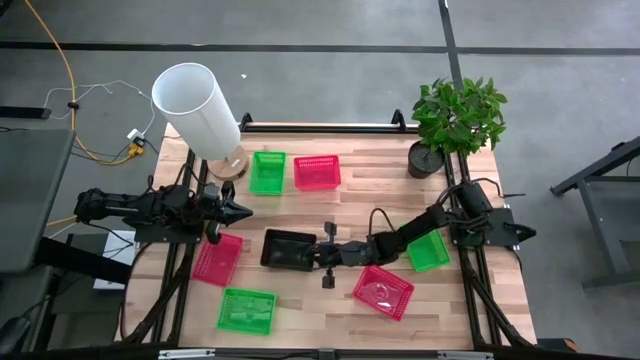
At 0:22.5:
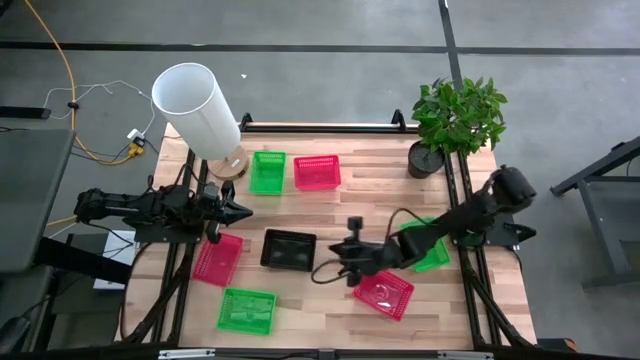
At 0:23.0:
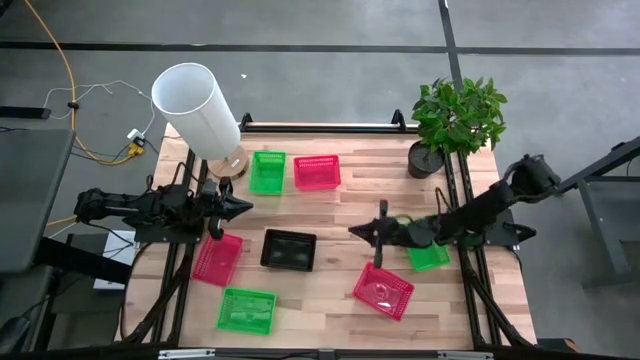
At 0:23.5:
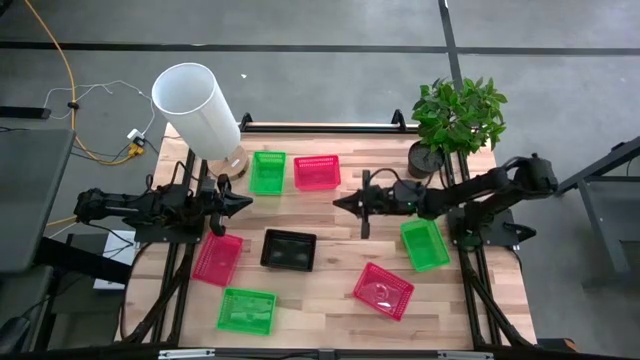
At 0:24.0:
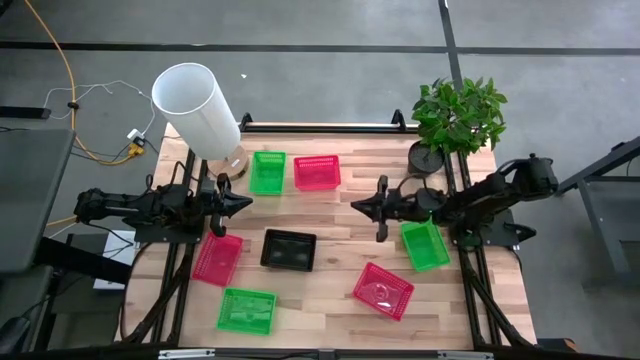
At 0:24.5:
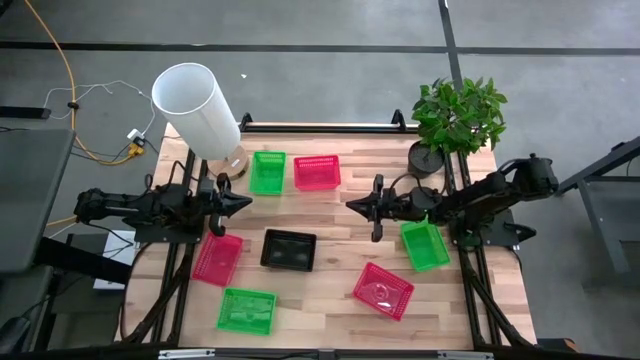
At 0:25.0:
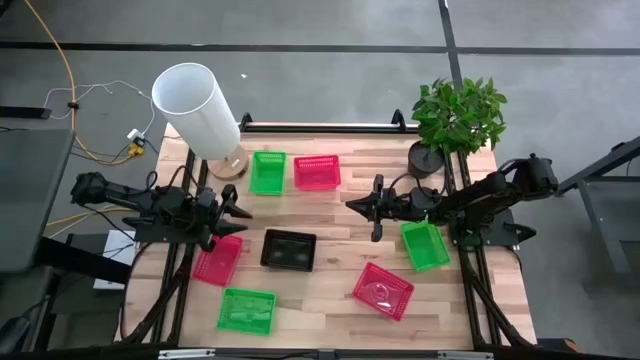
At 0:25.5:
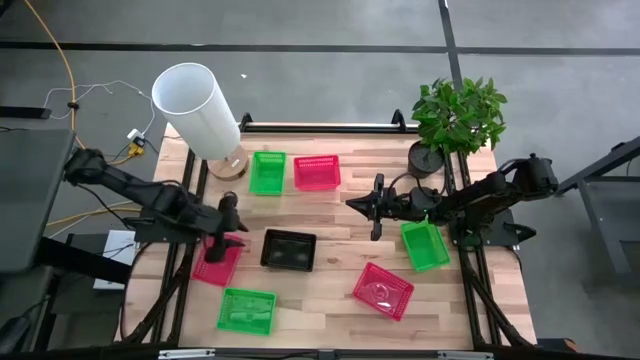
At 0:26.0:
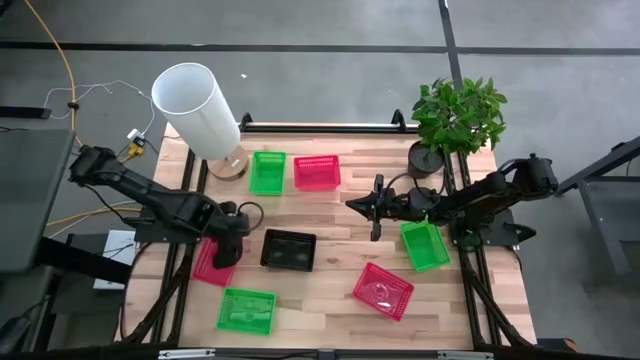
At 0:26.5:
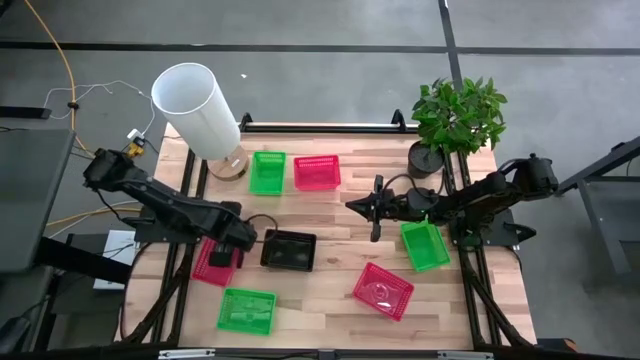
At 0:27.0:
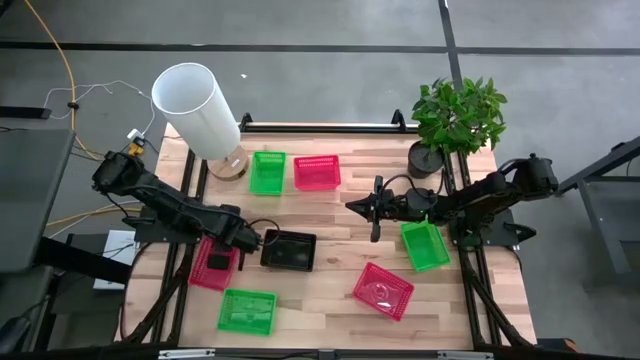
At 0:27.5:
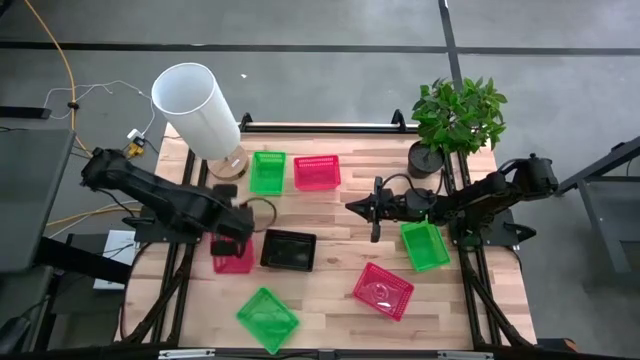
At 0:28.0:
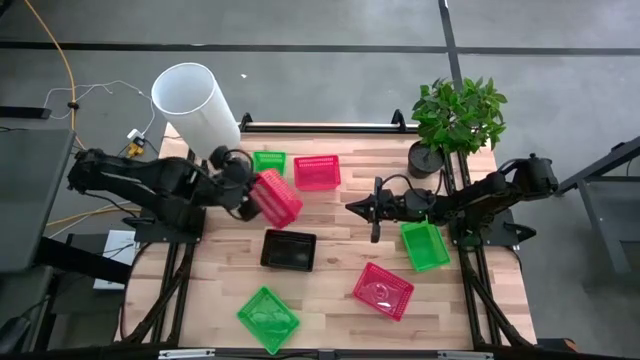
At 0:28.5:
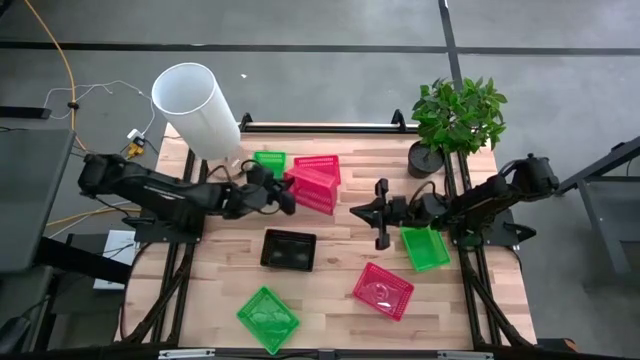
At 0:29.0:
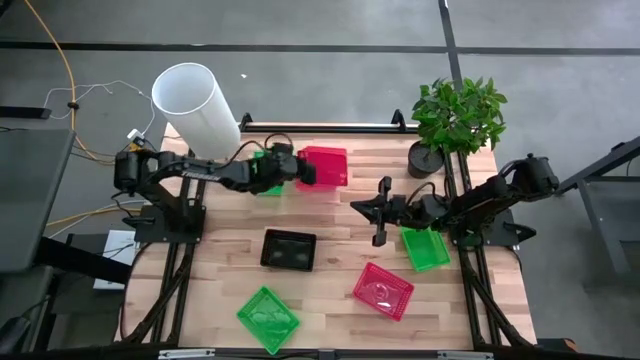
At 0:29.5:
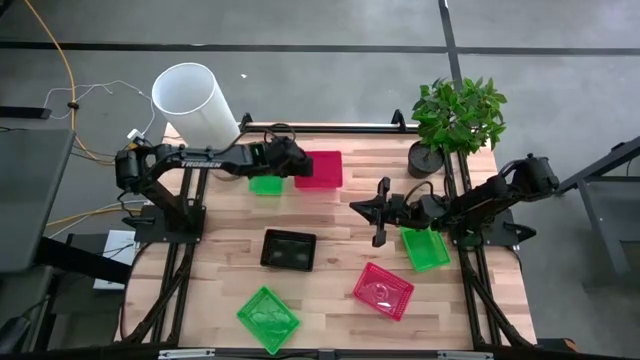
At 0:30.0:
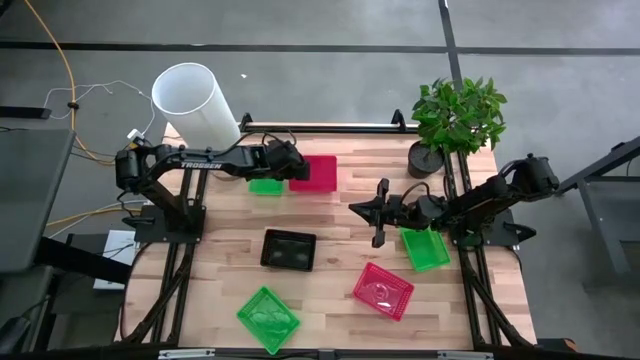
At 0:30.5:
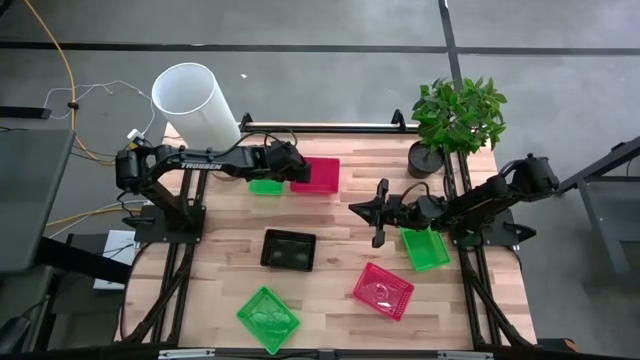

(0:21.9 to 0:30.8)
Stack the left red bin on the top red bin

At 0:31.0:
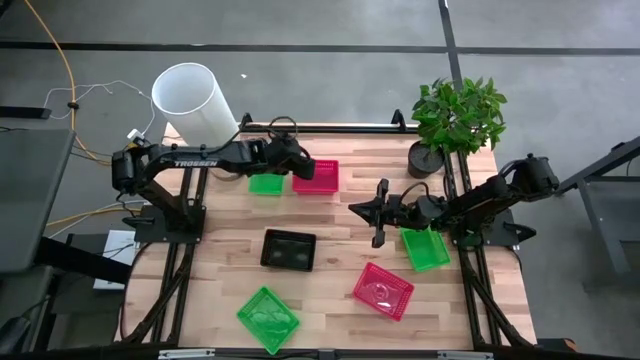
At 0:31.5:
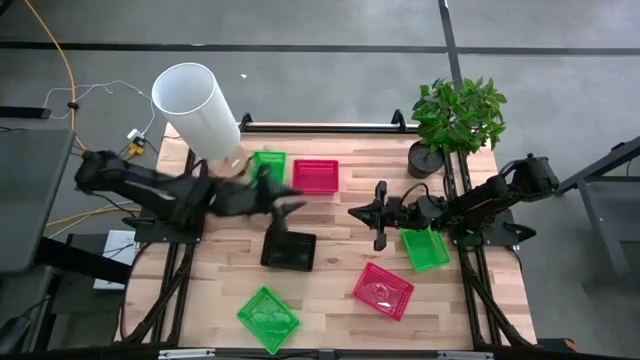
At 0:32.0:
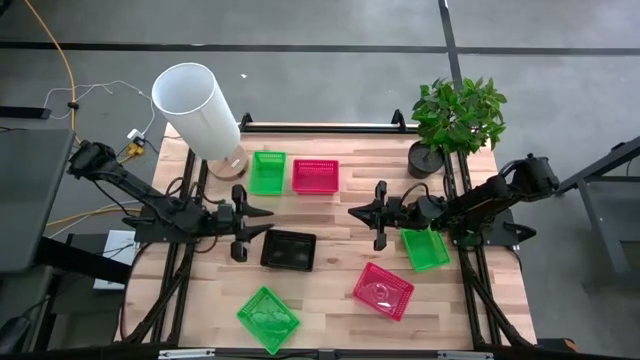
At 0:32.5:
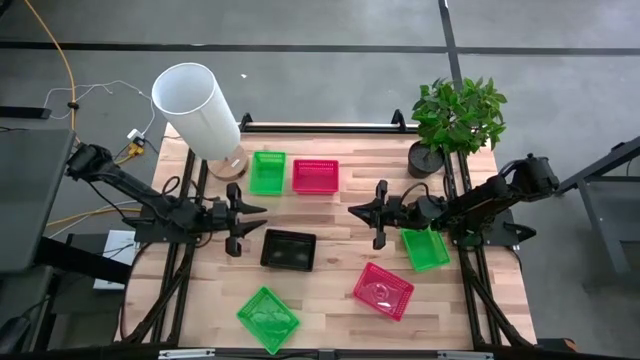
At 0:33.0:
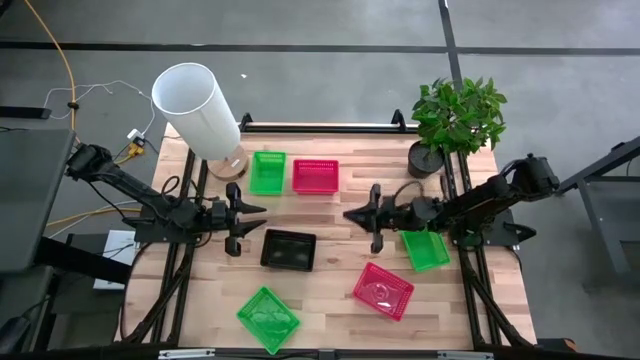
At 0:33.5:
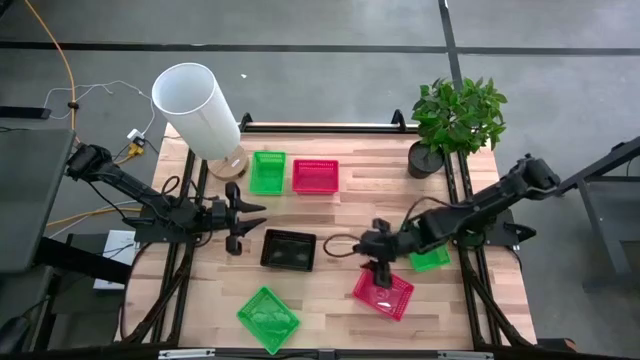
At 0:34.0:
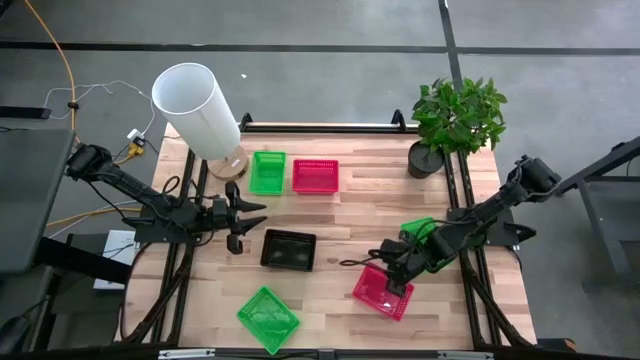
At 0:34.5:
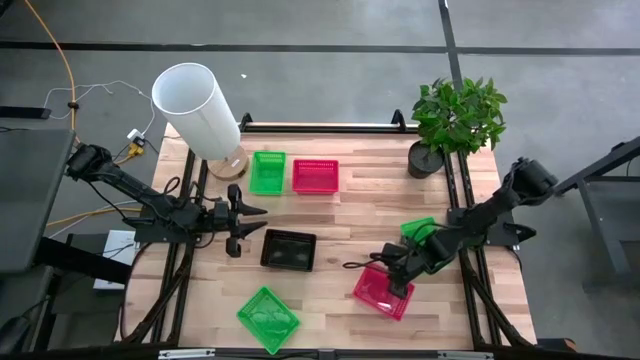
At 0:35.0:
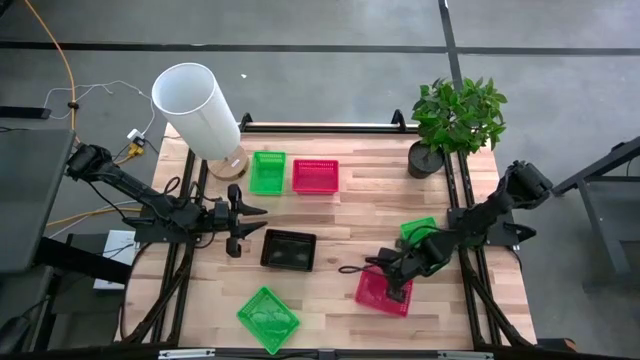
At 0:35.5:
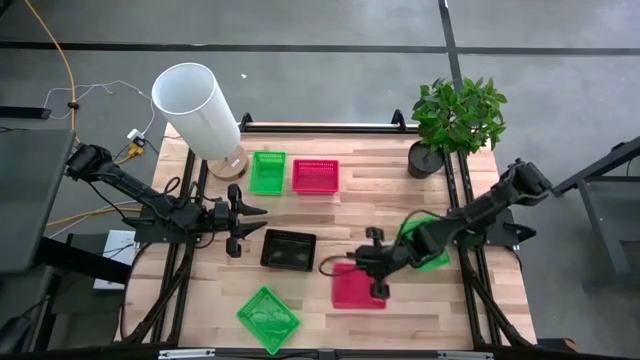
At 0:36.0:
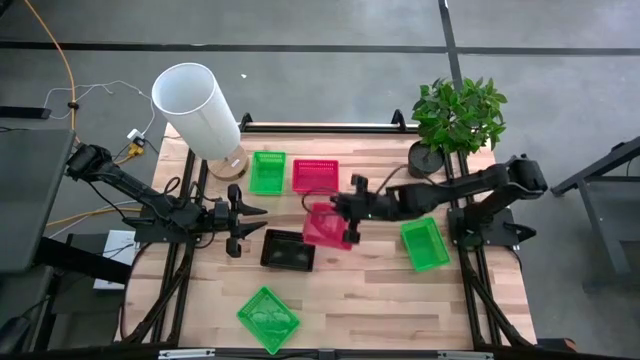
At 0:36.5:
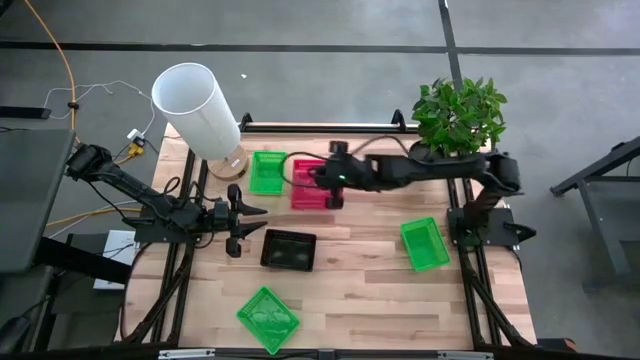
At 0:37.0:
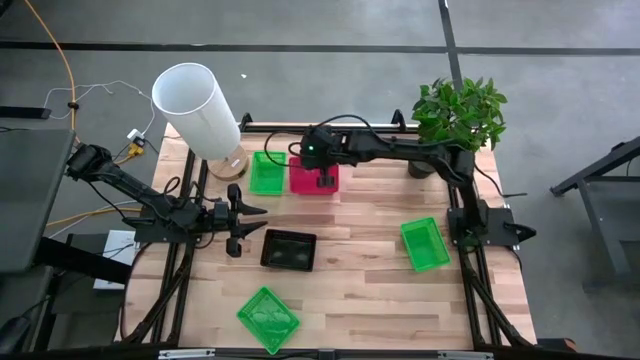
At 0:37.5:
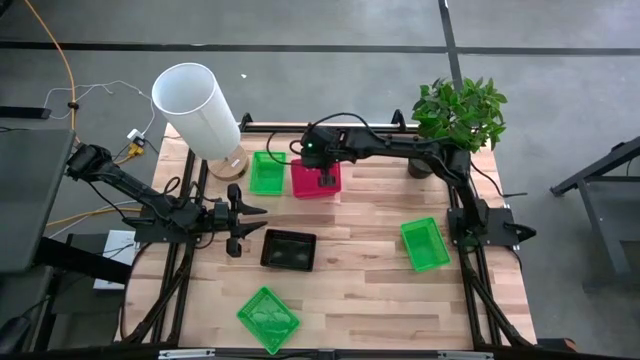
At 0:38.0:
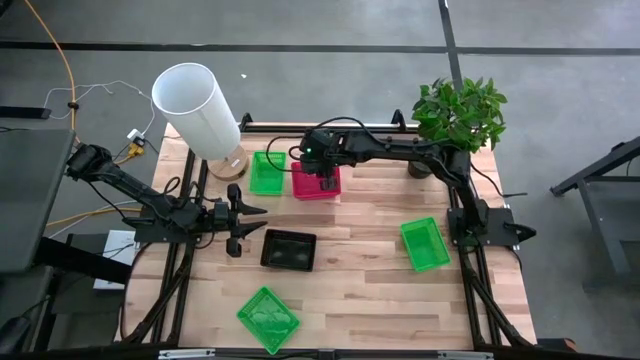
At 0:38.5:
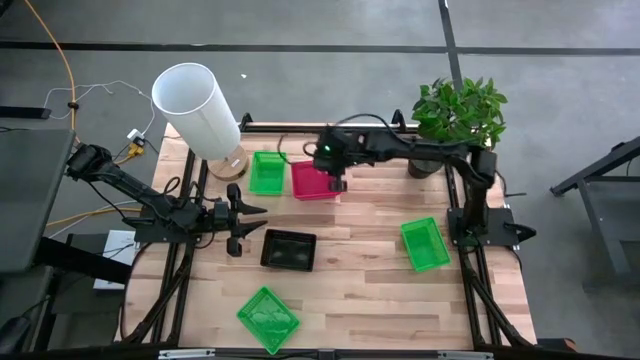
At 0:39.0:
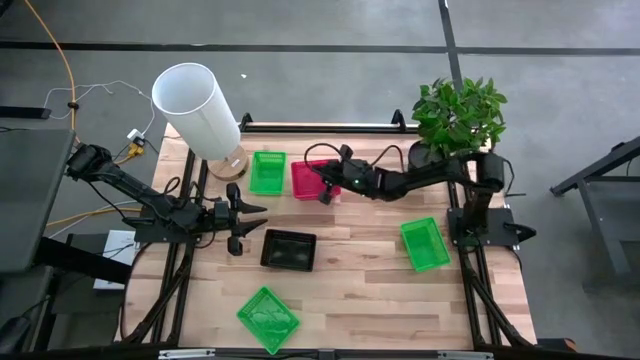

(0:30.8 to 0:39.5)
Stack the bottom red bin on the top red bin

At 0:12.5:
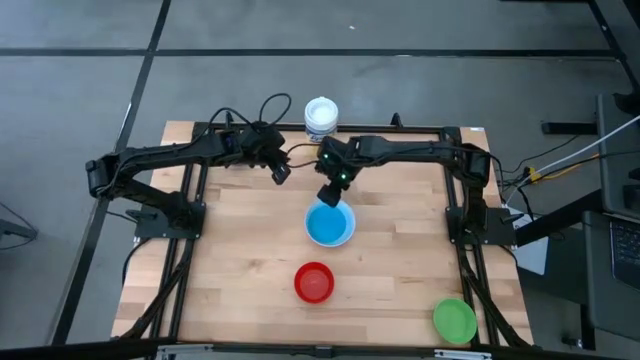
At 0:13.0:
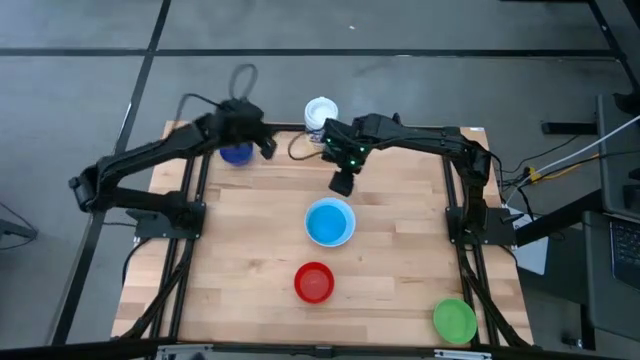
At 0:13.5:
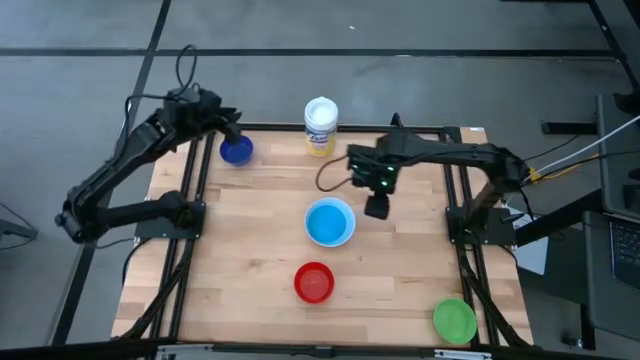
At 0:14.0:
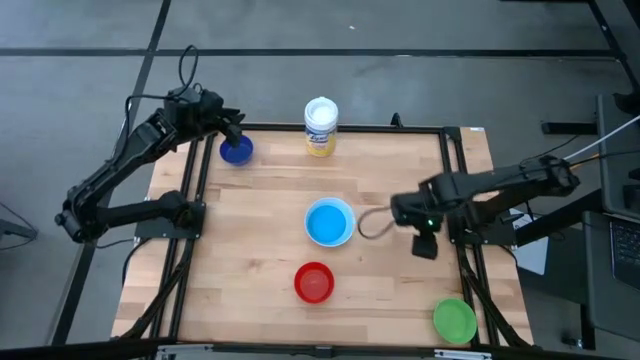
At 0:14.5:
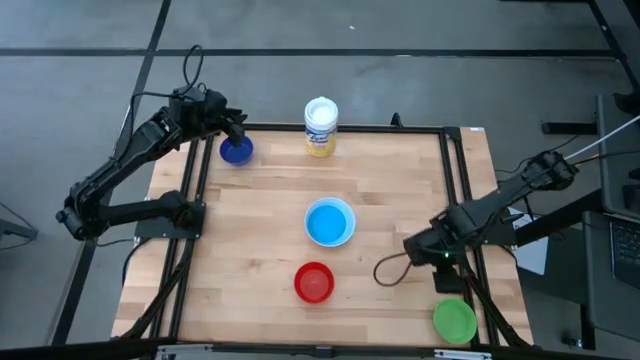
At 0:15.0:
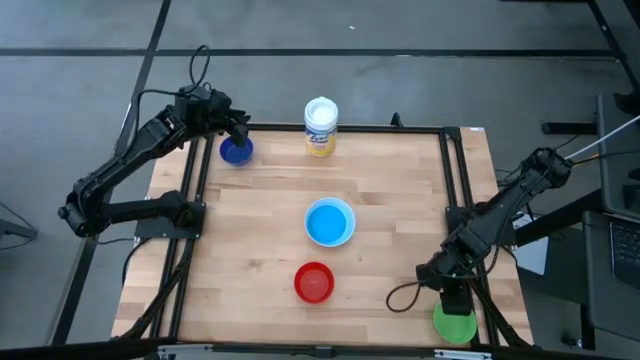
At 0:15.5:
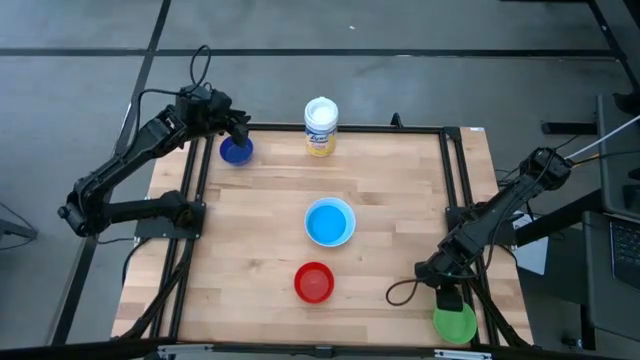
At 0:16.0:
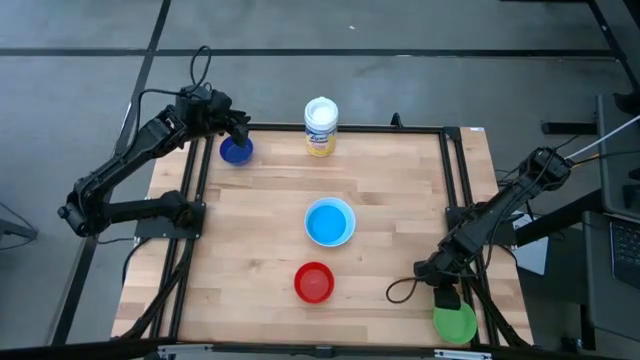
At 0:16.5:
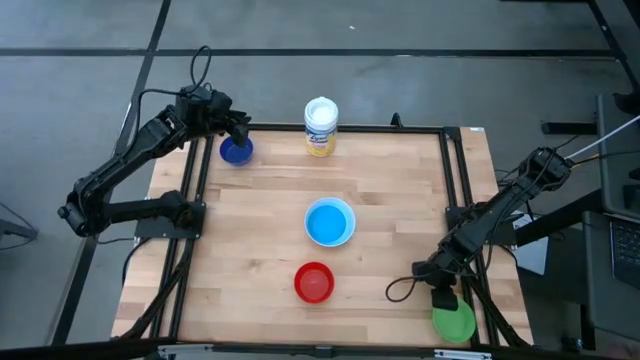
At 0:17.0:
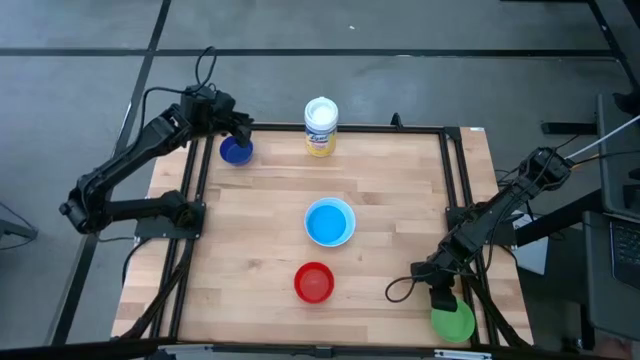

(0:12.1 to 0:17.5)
Stack the green bowl on top of the light blue bowl
